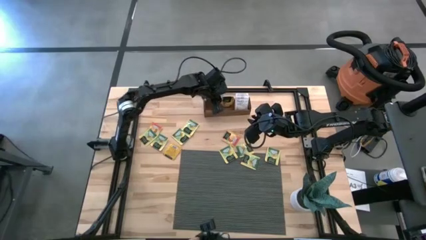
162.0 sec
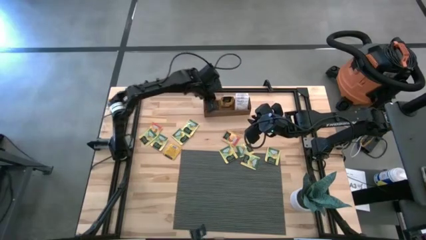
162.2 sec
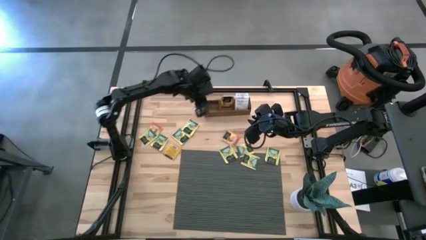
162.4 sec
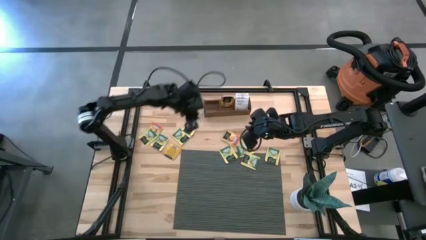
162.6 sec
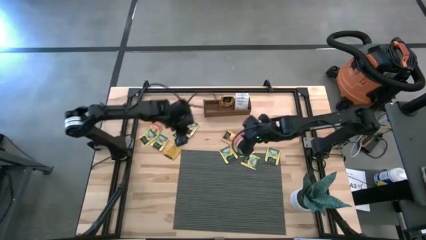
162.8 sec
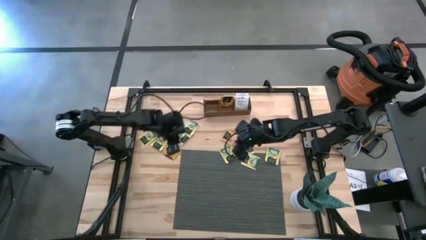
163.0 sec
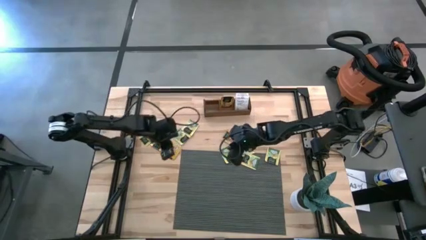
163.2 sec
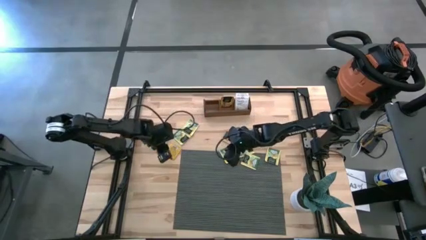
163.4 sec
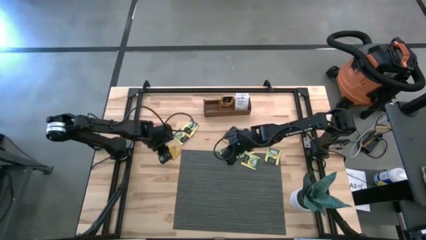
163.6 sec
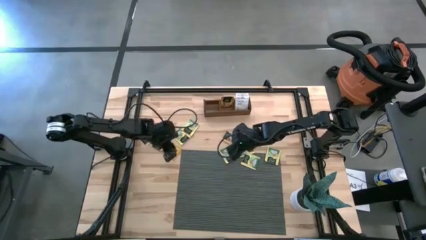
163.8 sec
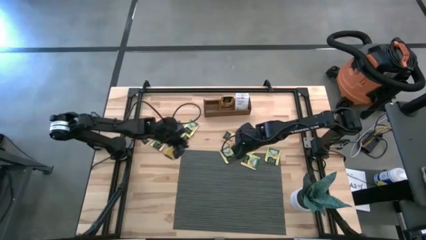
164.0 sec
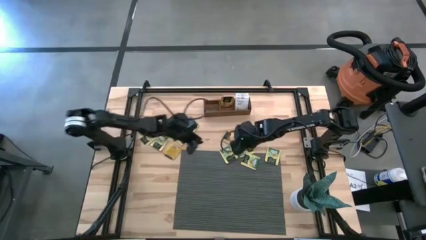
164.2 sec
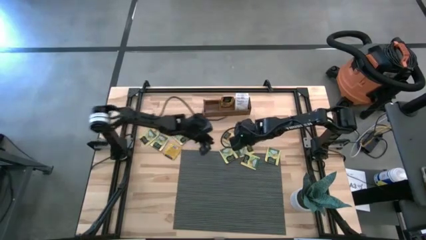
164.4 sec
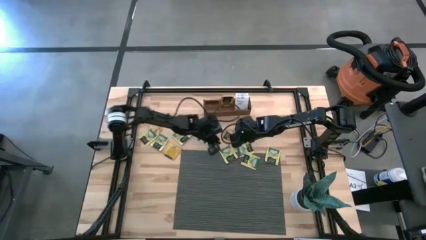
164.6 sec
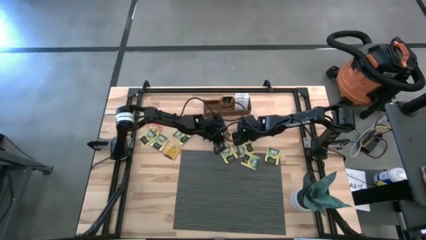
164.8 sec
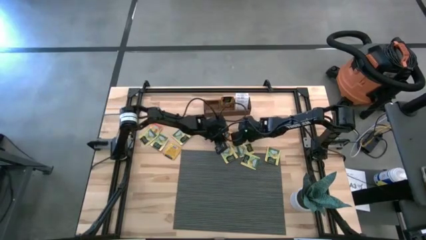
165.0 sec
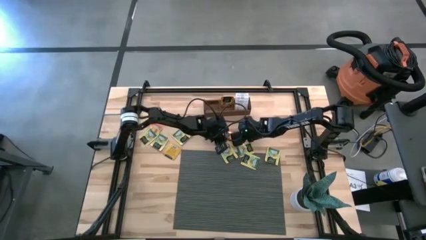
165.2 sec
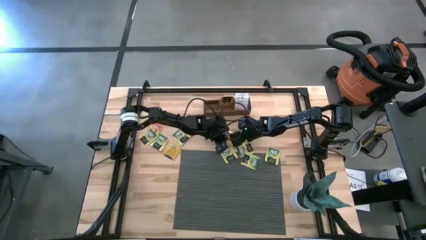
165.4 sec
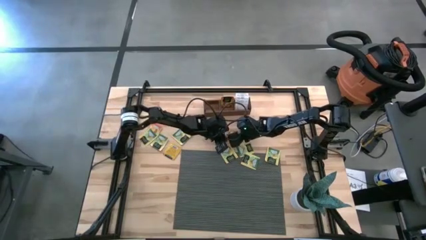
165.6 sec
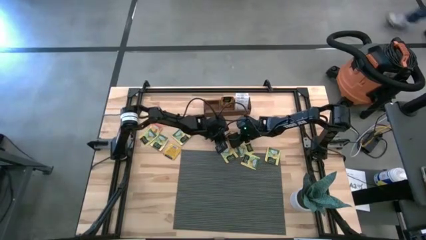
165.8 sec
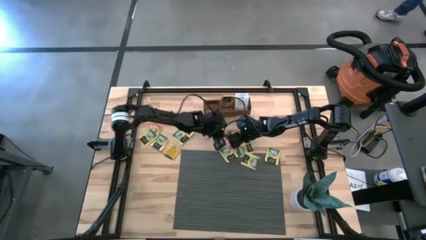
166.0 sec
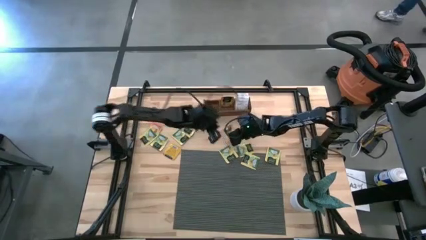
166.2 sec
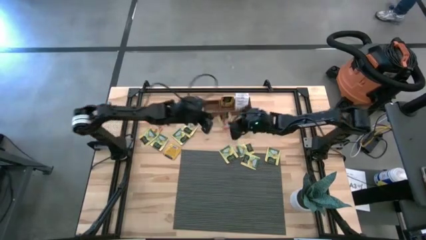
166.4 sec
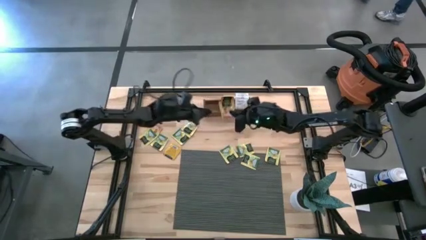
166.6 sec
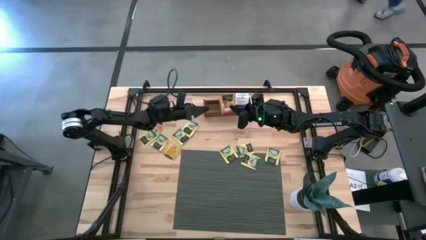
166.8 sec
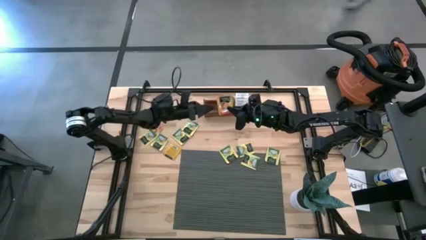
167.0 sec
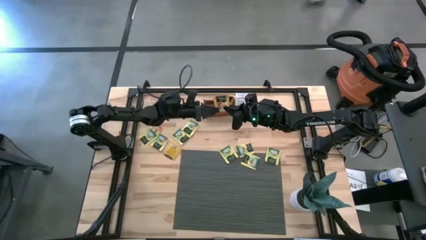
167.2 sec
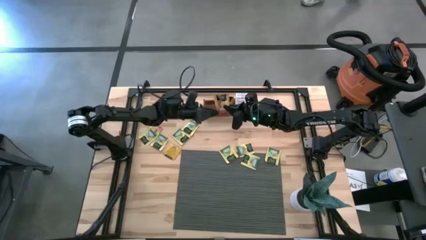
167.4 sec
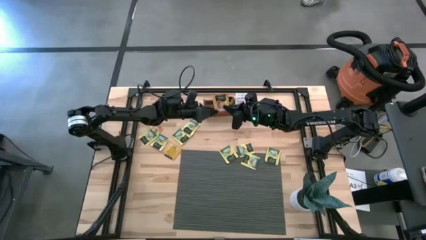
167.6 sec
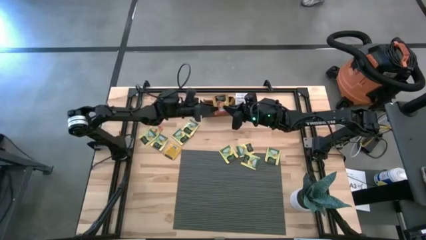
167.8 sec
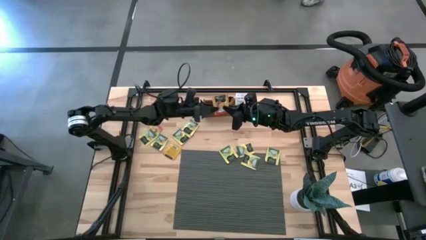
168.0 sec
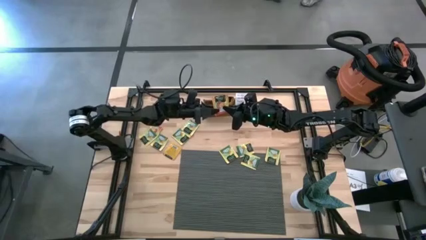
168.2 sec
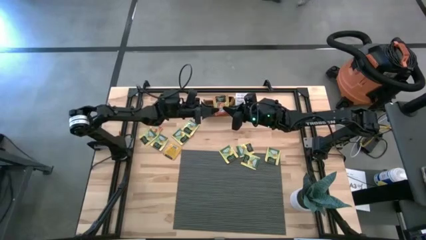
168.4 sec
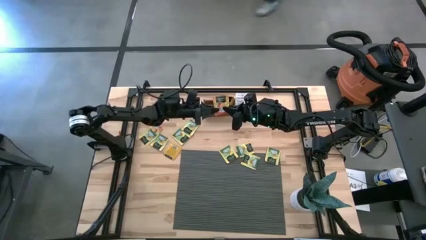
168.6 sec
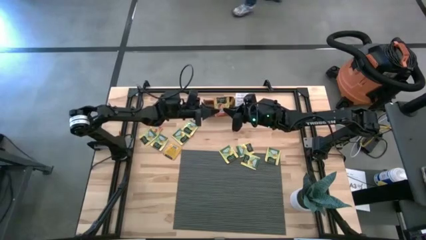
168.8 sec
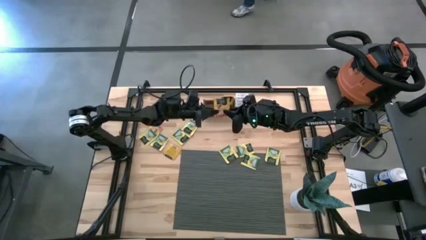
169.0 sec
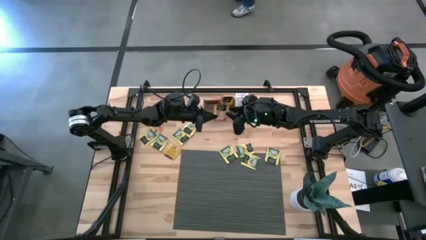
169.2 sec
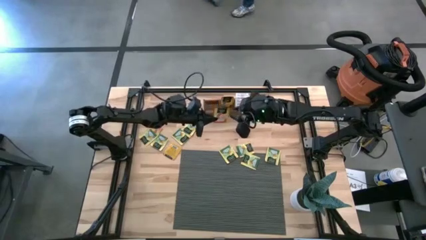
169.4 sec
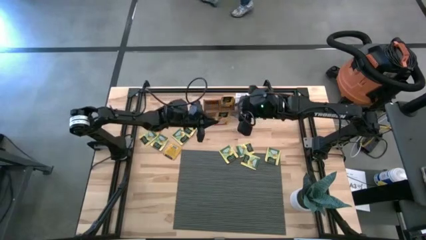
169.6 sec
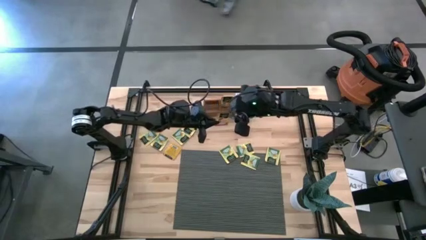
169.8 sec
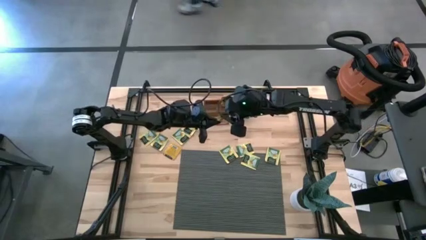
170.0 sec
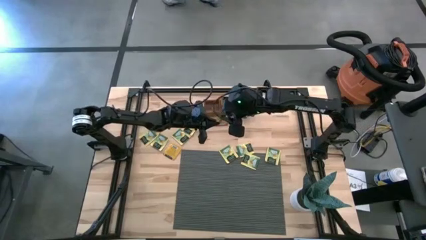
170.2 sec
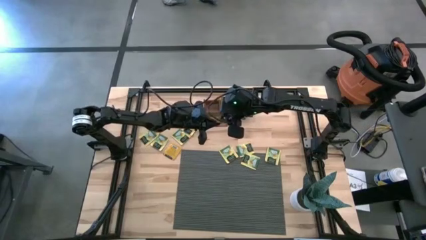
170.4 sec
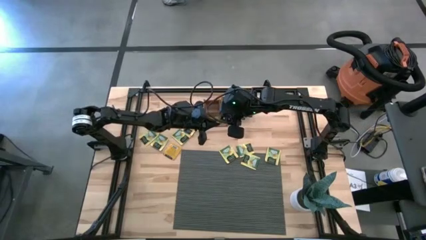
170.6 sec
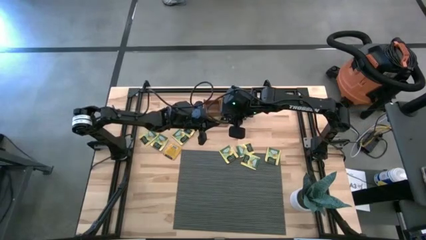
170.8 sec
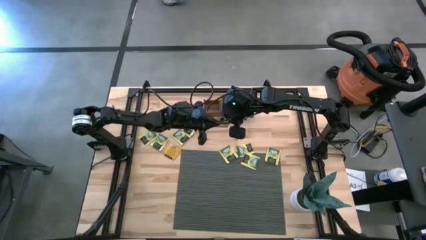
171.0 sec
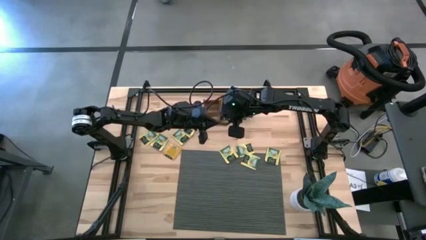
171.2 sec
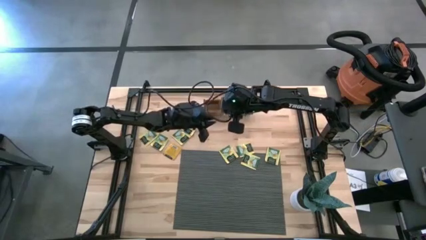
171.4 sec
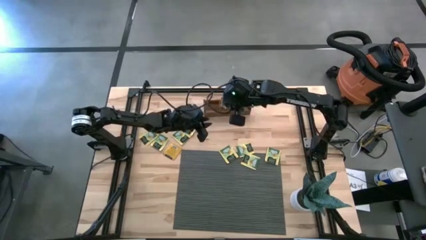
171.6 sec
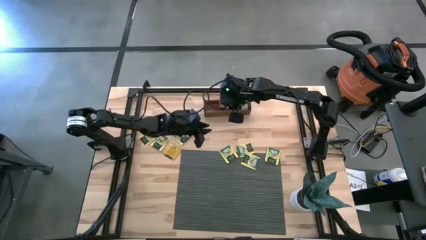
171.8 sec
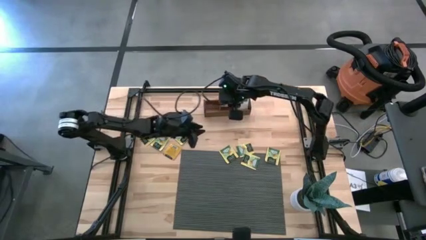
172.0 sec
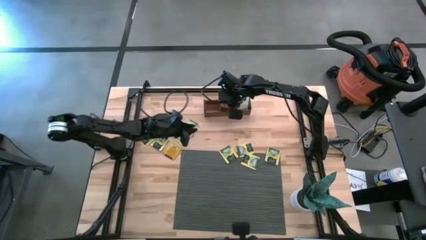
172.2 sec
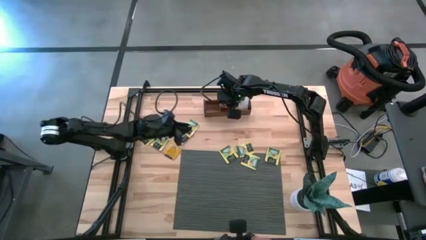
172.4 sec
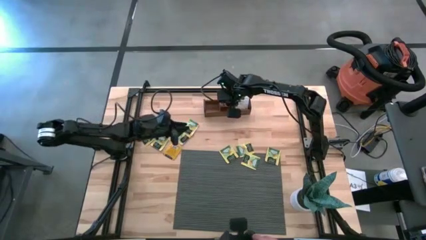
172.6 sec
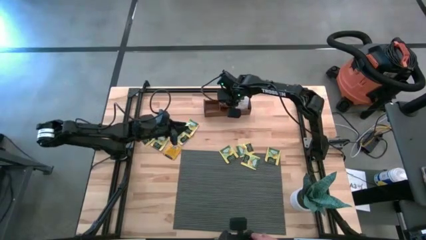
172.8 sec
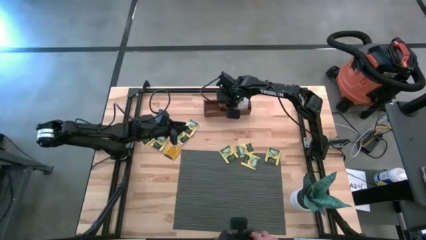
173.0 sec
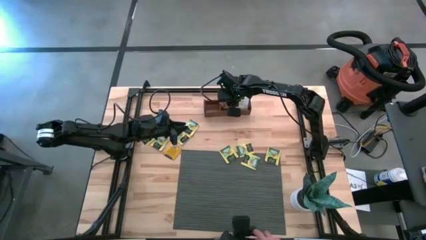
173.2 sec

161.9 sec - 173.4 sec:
Task: Pick & Place Tea
Put the orange tea bag into the middle section of the wooden organizer

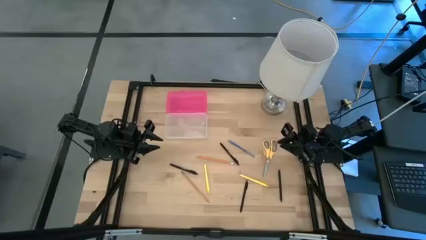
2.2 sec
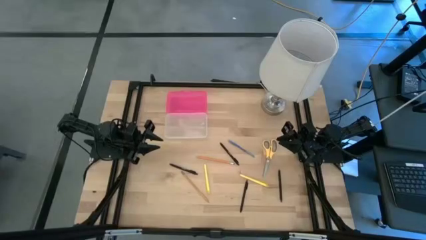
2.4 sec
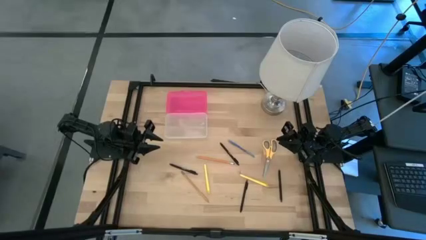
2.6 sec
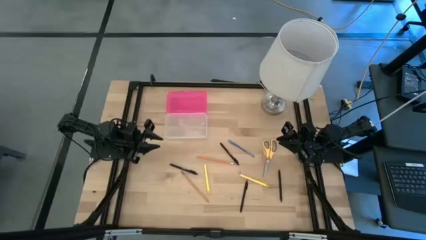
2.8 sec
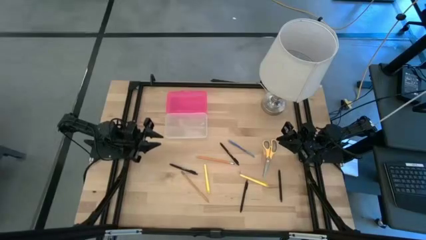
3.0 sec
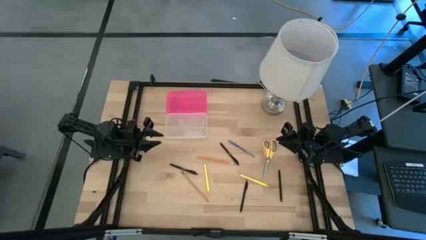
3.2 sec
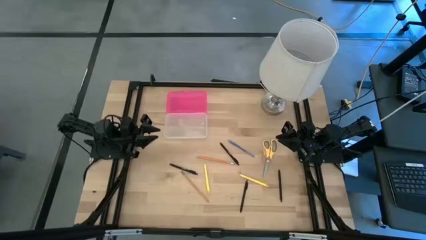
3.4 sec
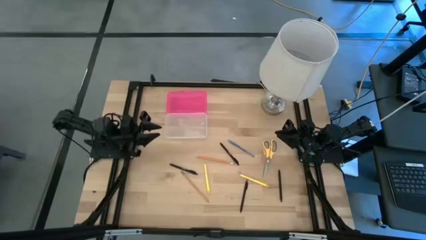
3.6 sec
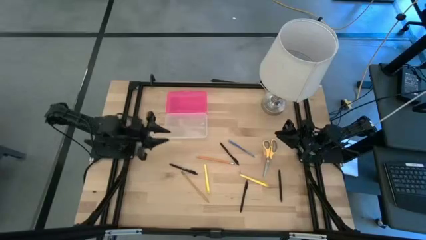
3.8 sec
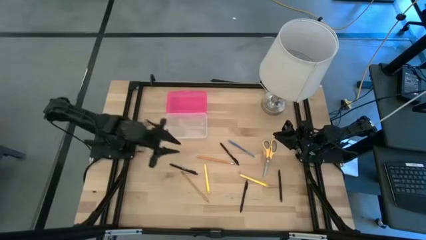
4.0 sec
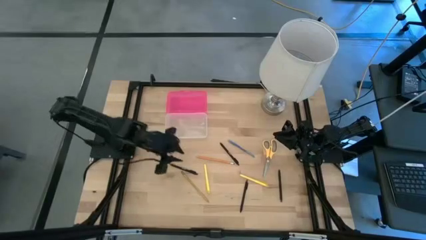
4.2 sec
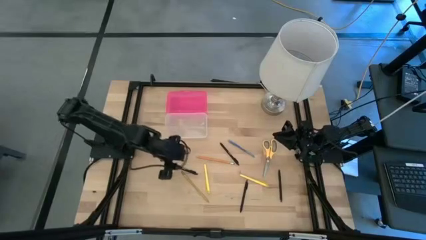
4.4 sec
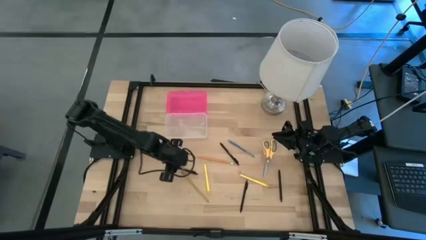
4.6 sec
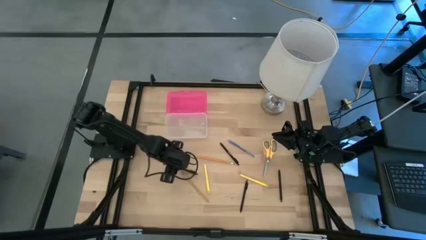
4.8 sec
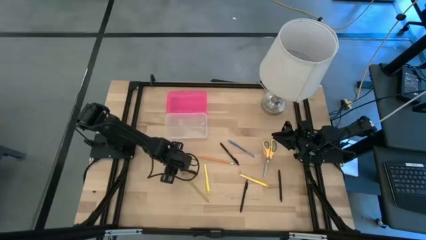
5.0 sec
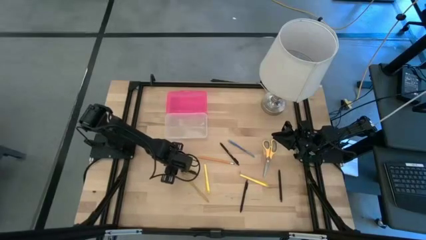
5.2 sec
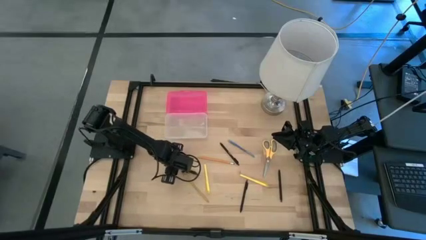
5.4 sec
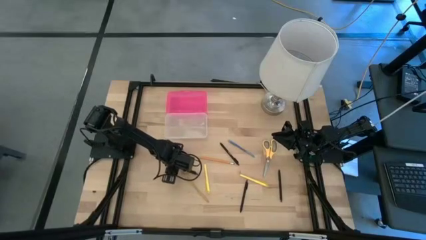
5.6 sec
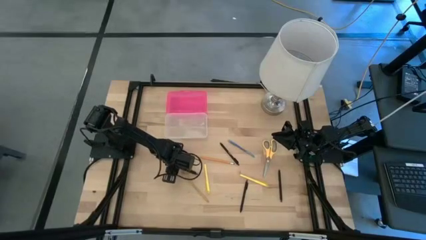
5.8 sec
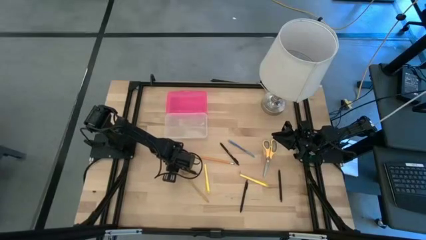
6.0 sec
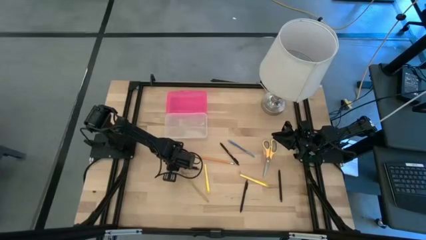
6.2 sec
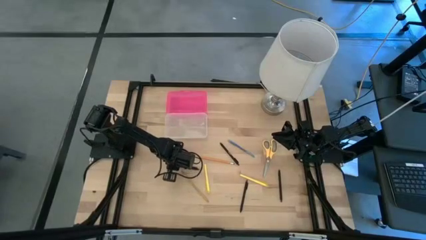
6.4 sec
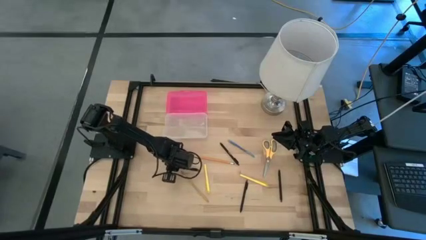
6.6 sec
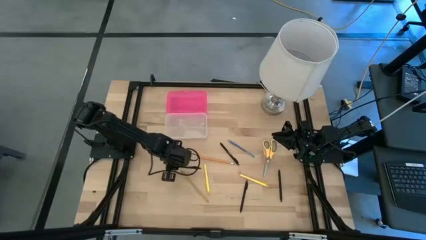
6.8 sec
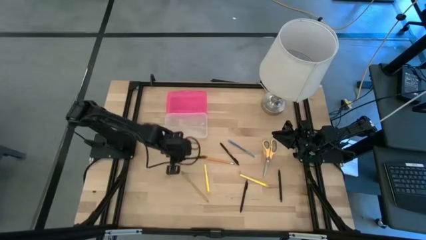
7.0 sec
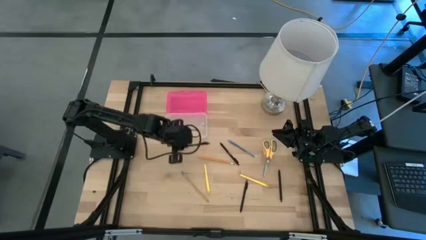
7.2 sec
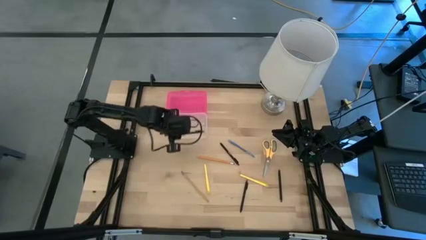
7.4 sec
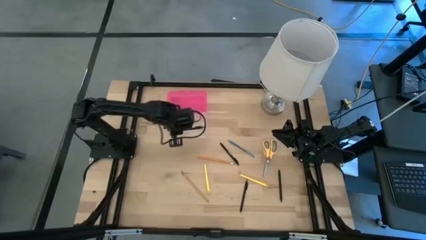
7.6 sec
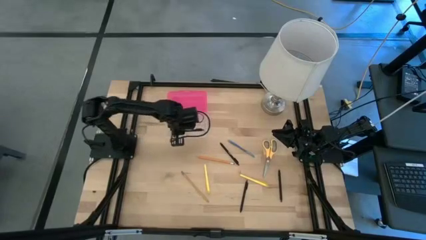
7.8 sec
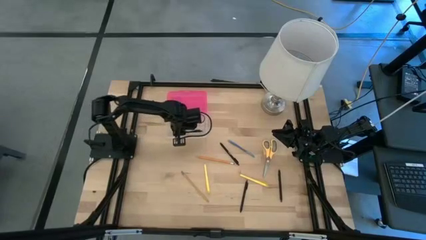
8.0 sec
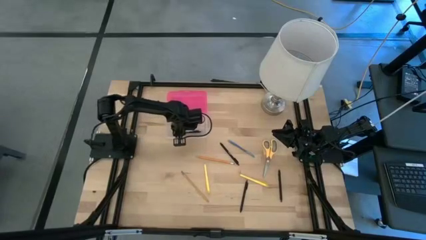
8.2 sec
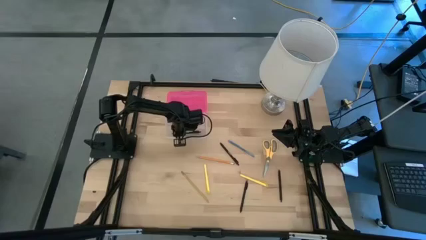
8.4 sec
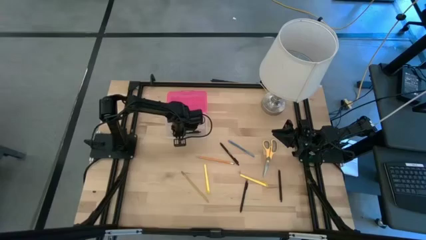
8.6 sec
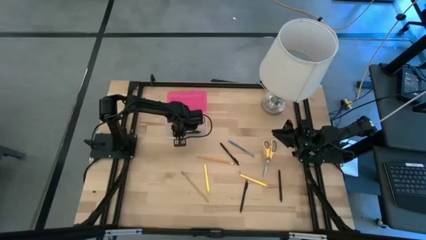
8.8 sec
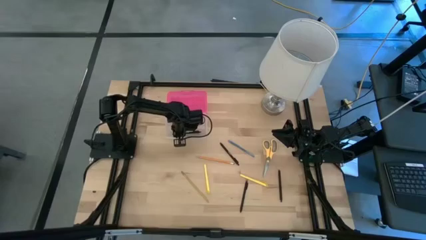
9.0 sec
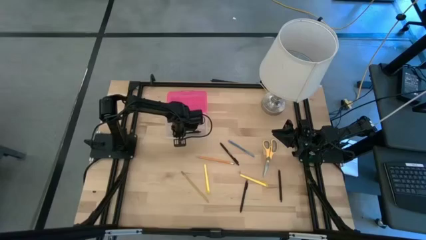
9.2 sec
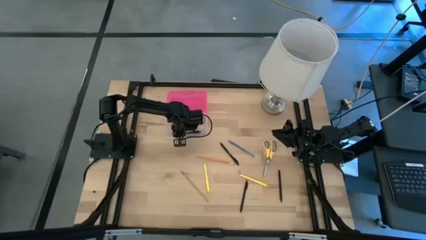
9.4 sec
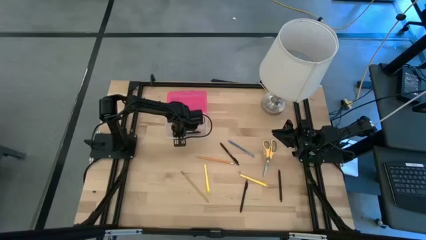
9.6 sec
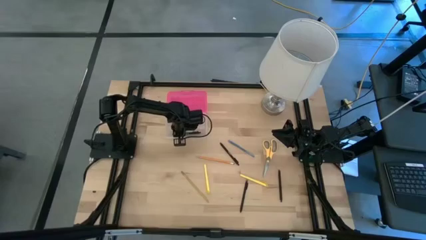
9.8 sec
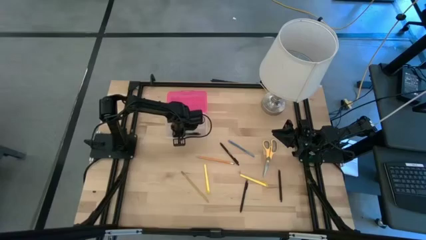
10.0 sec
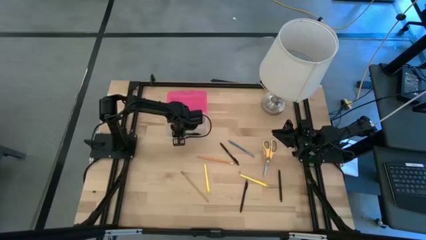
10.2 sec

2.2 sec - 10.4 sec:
Task: Pick & place school supplies into a supply box
Put the black pen into the pink supply box
